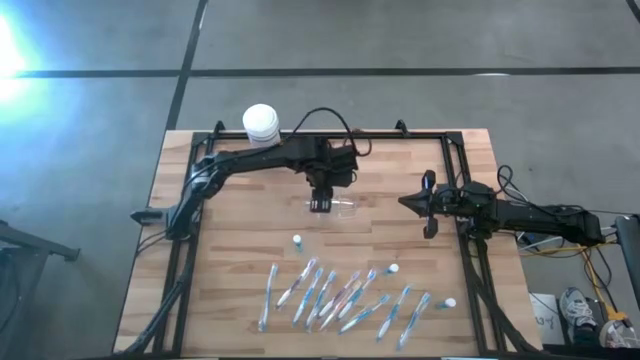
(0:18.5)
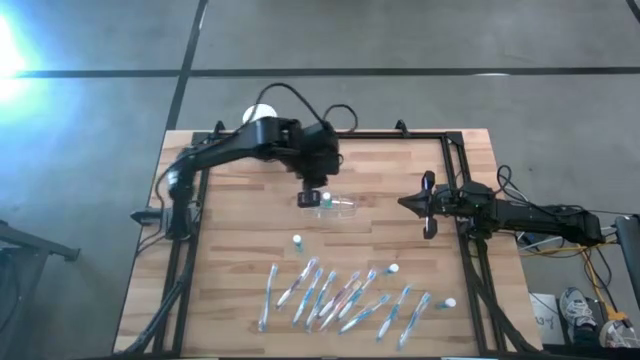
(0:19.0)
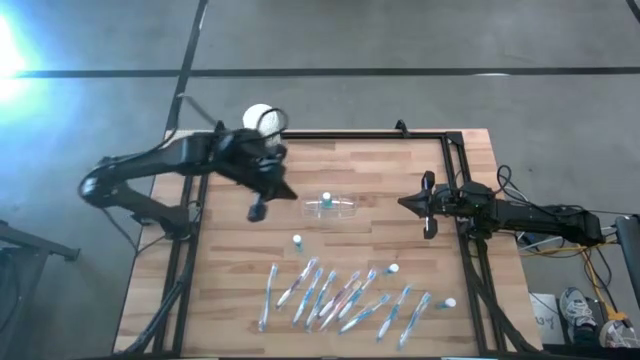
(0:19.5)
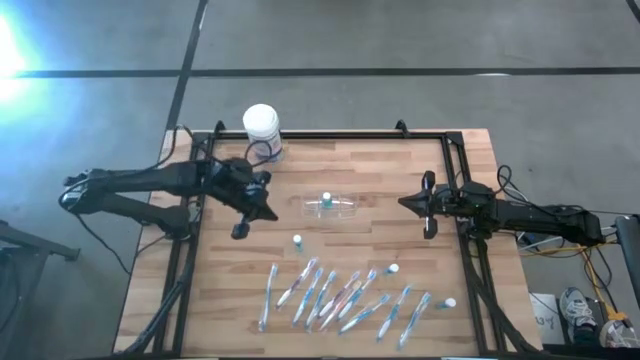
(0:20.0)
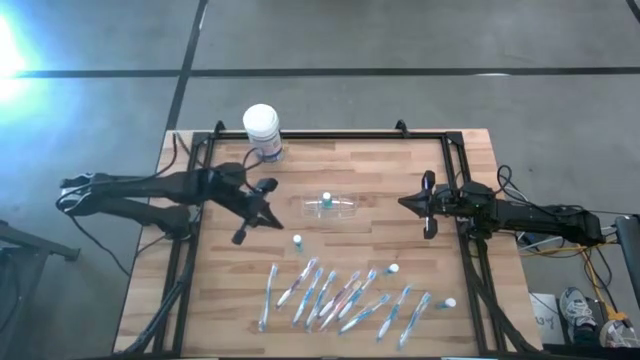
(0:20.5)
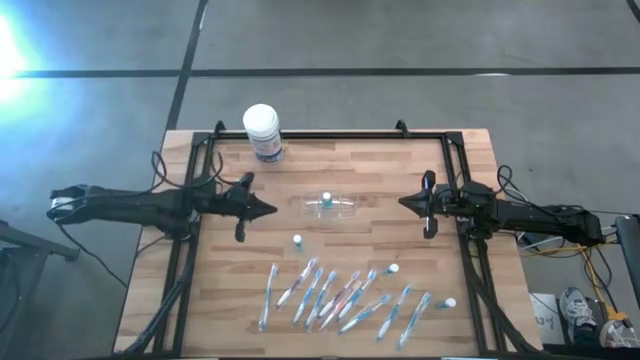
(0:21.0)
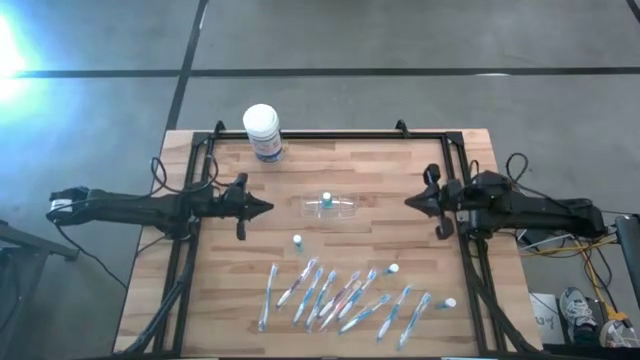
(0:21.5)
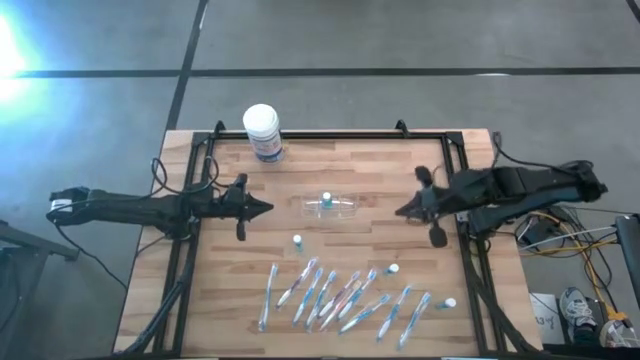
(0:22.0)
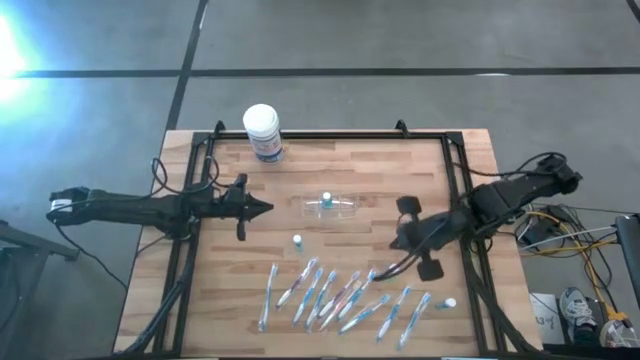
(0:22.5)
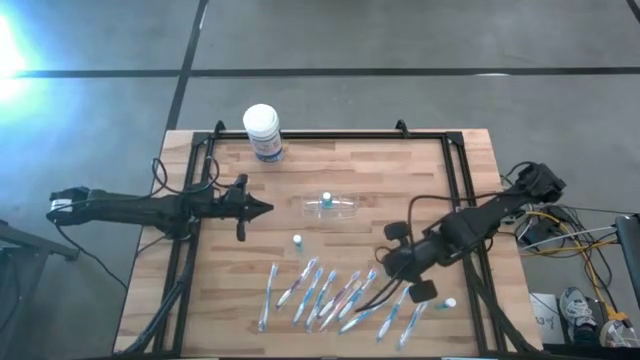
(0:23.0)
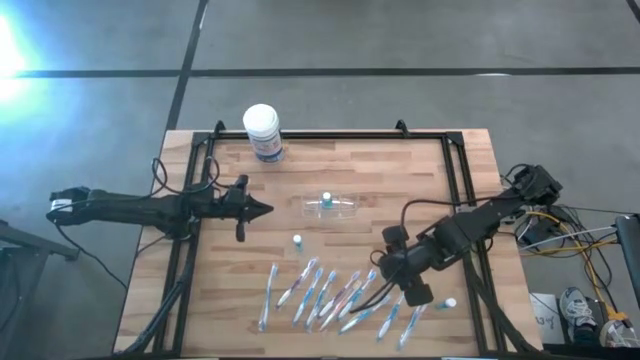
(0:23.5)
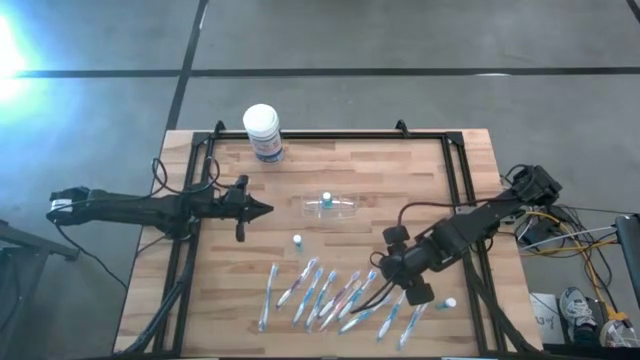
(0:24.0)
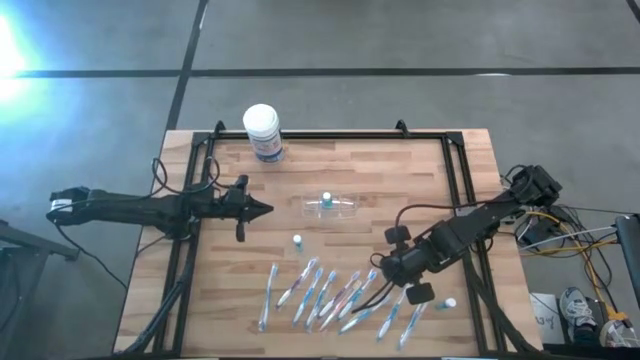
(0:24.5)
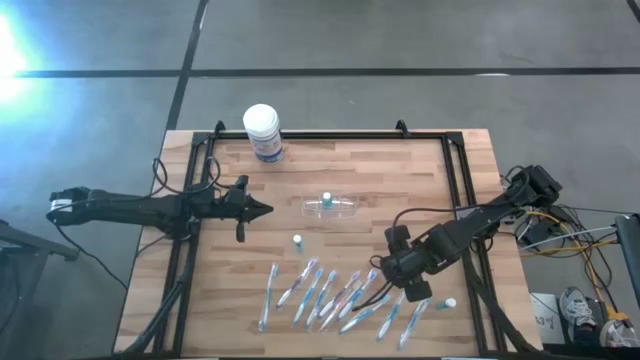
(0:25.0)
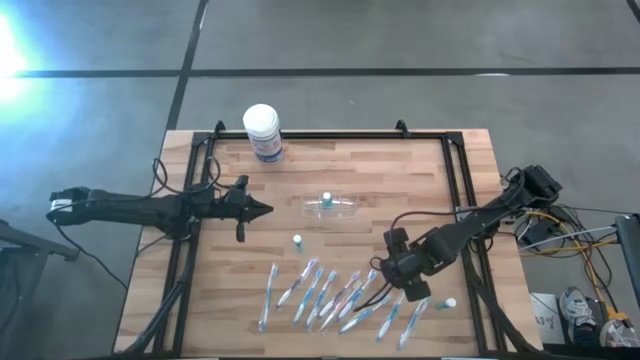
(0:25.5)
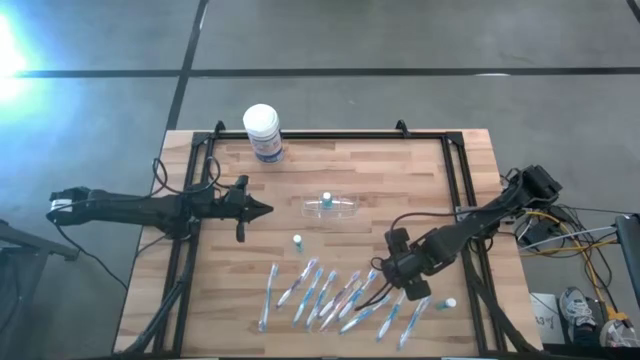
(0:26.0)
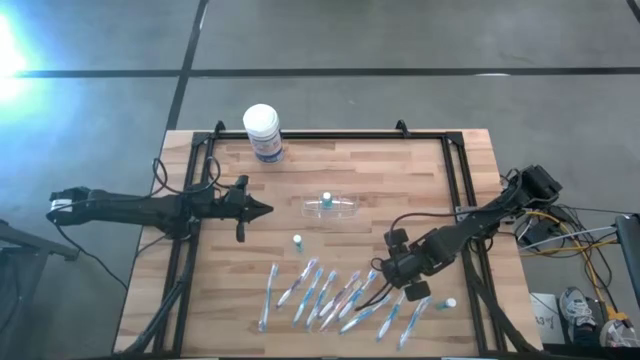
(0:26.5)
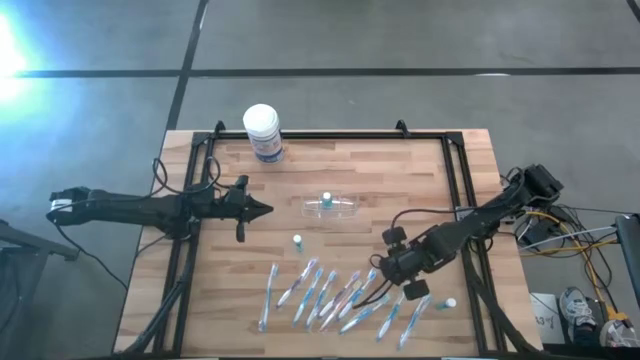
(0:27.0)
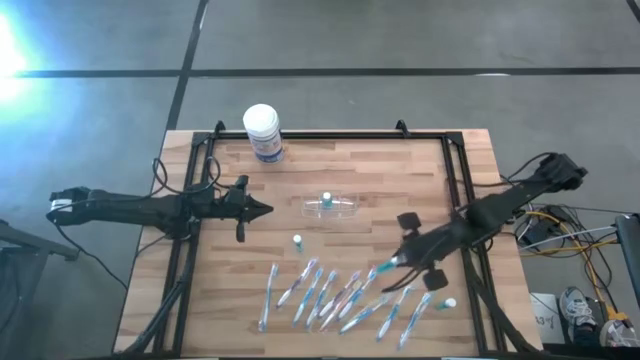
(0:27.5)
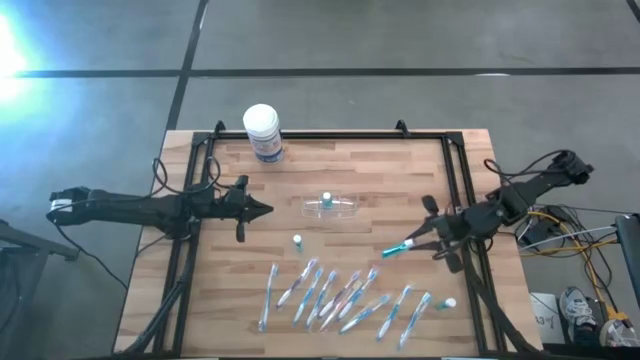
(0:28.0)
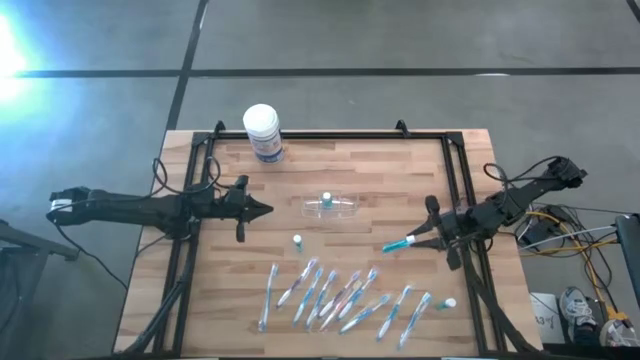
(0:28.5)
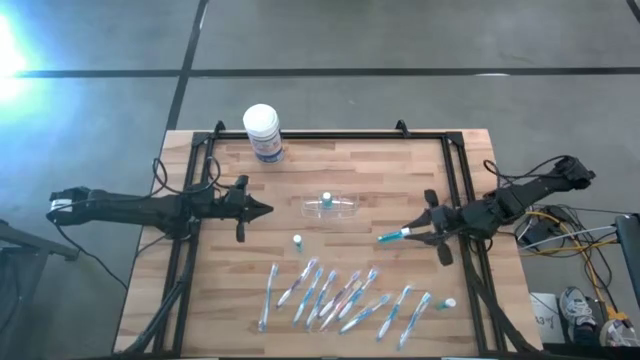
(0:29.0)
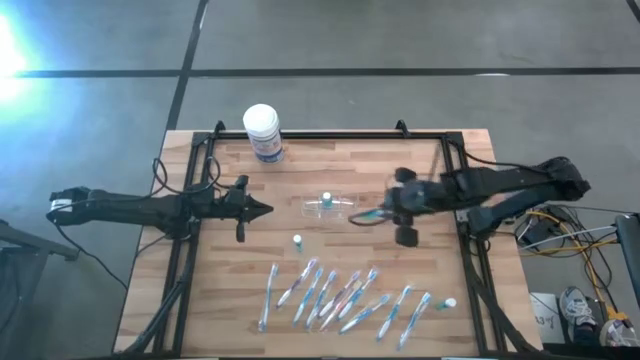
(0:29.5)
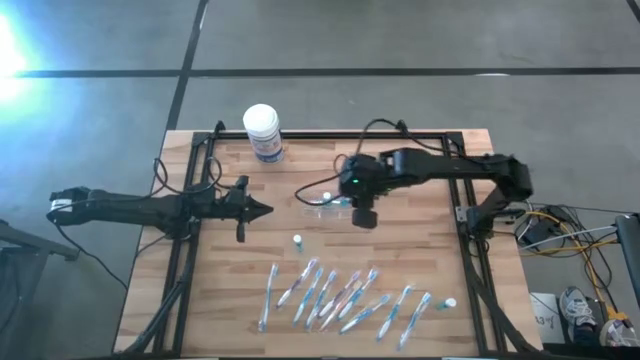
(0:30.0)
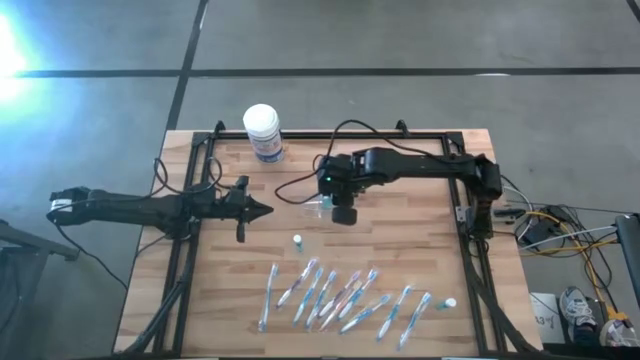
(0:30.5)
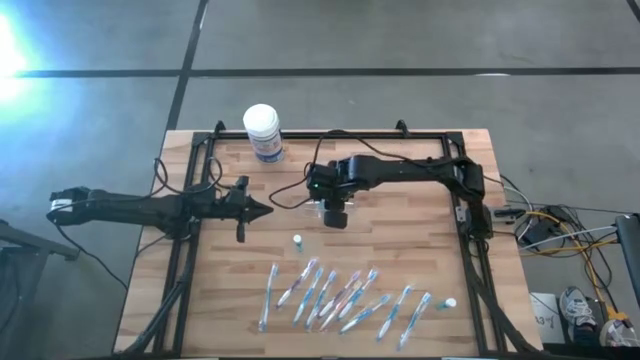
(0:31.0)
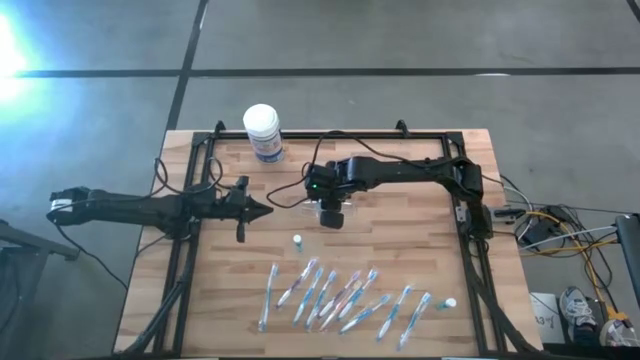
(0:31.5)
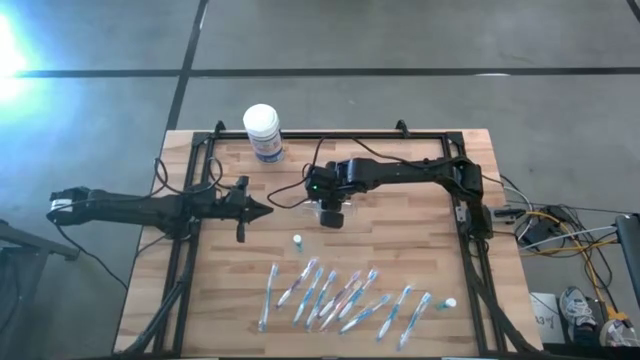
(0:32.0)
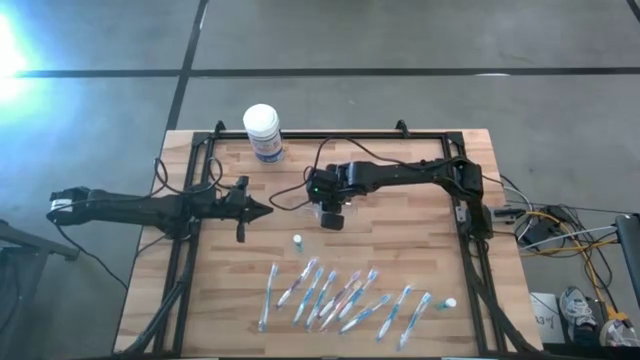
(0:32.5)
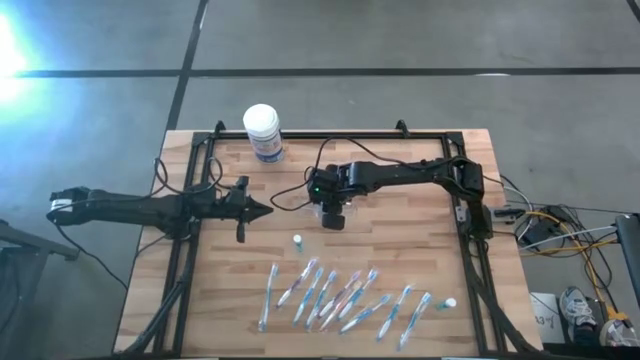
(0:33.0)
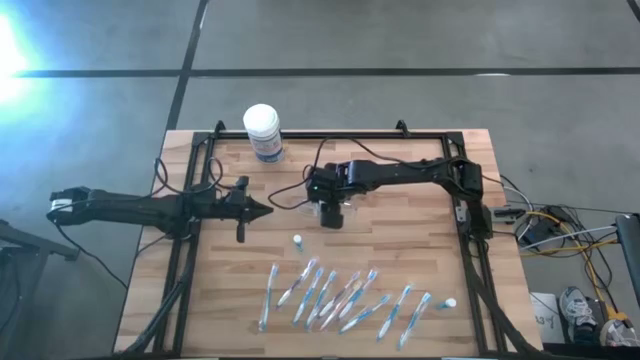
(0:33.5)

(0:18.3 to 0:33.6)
Task: Pick & Place toothbrushing station
Put the blue mouthwash into the transparent bin organizer
